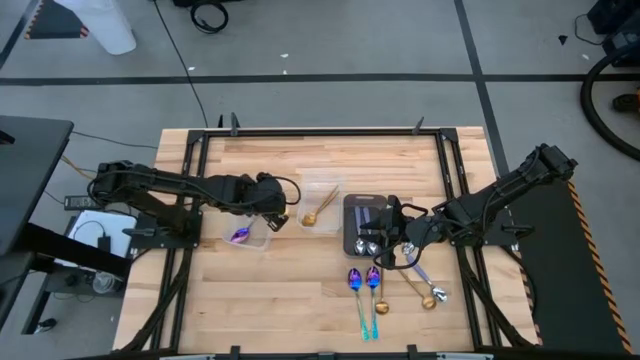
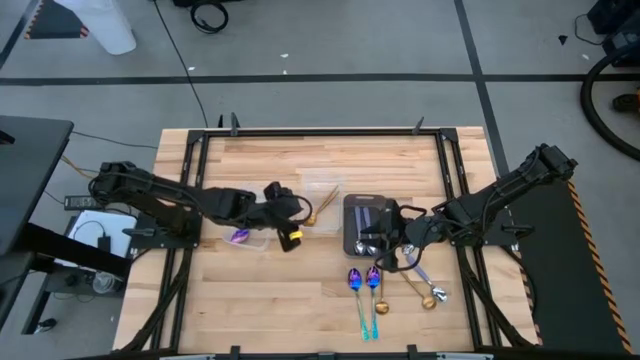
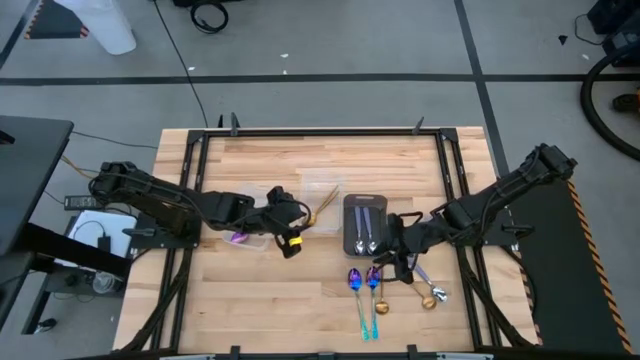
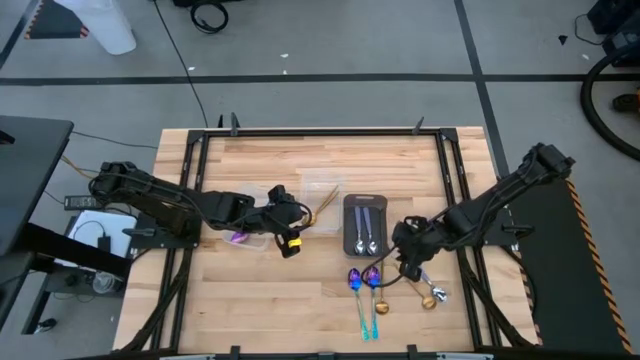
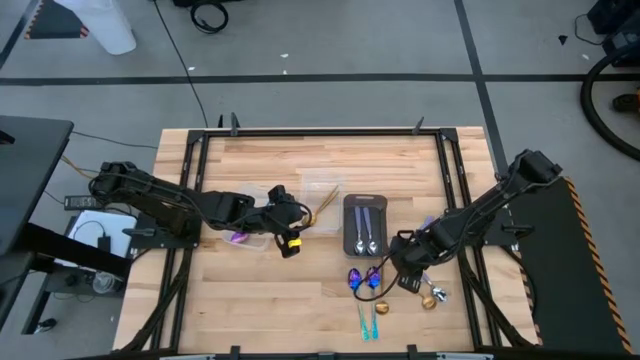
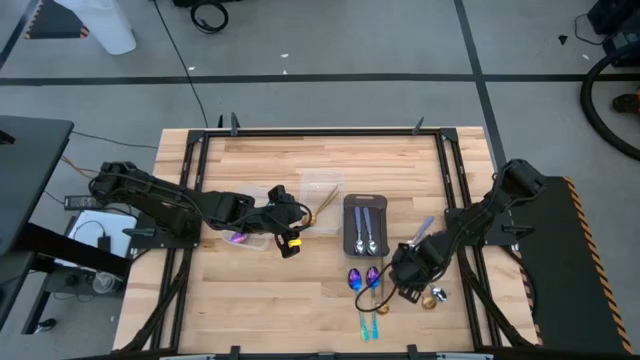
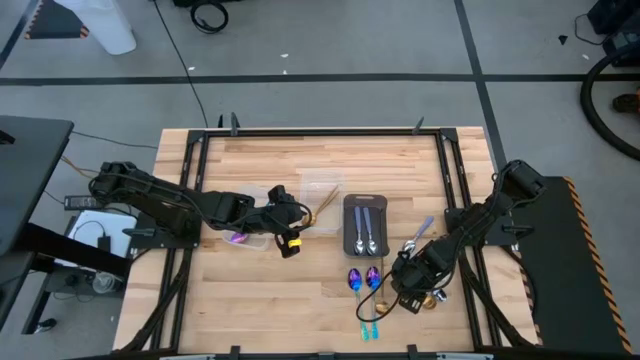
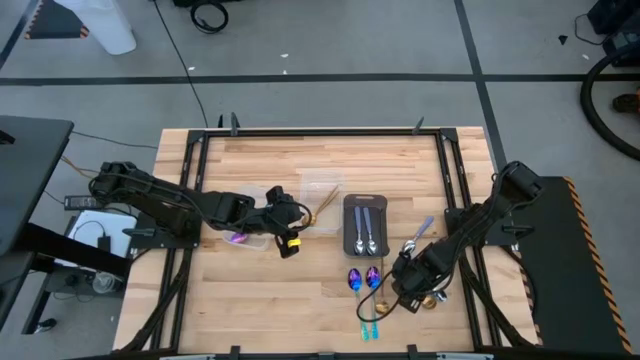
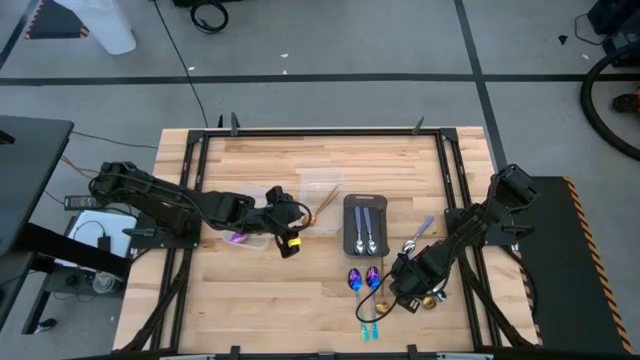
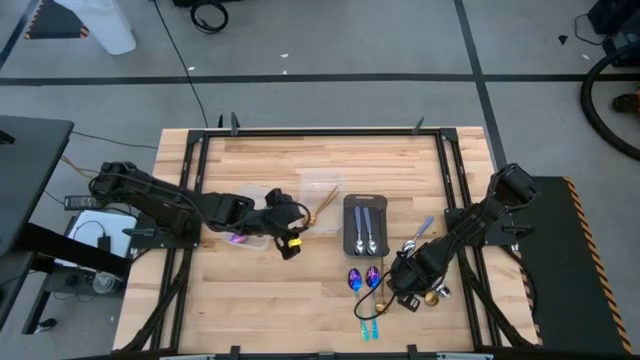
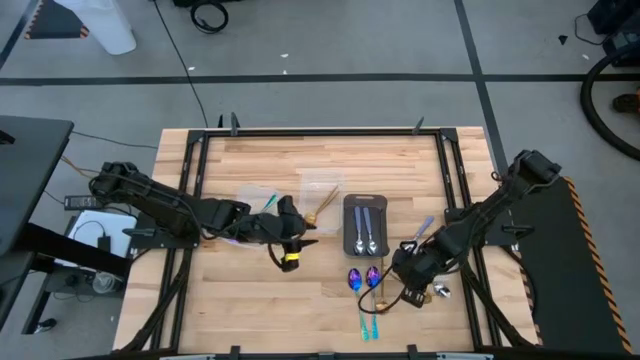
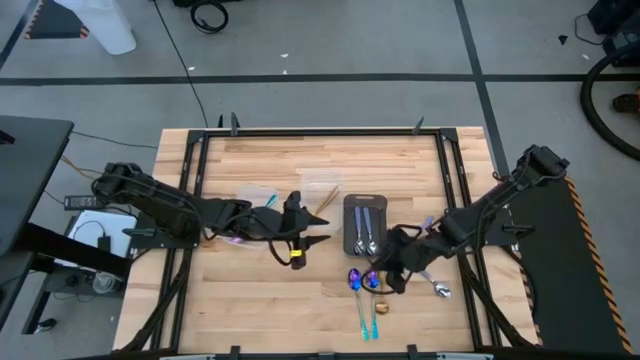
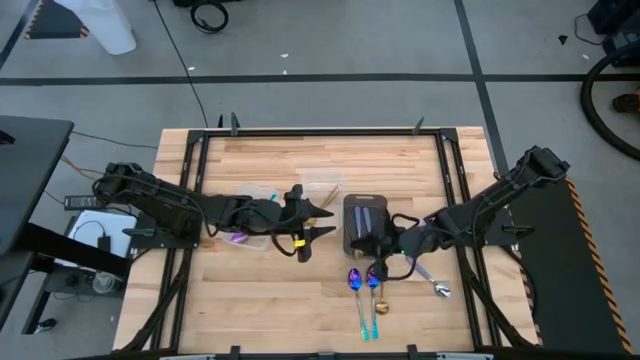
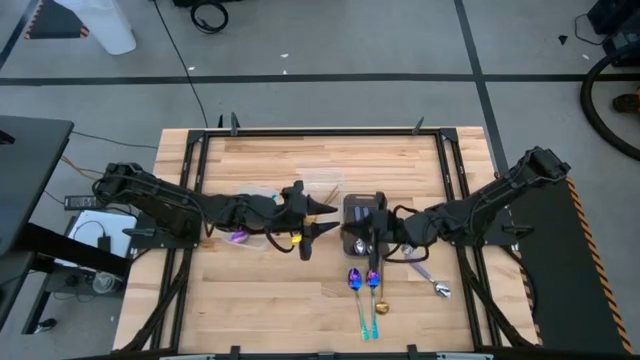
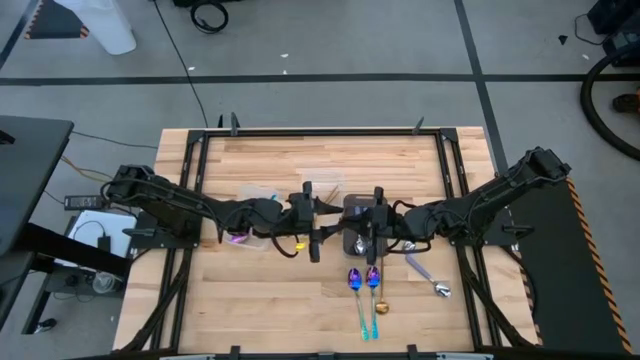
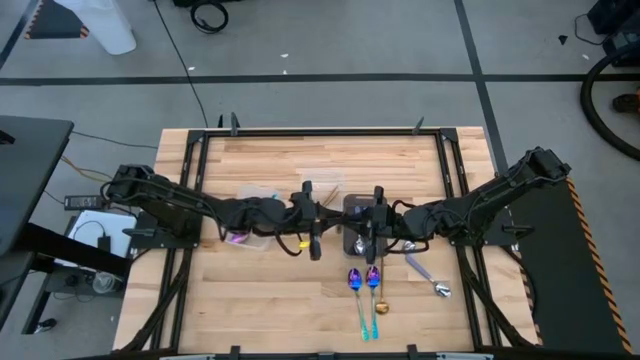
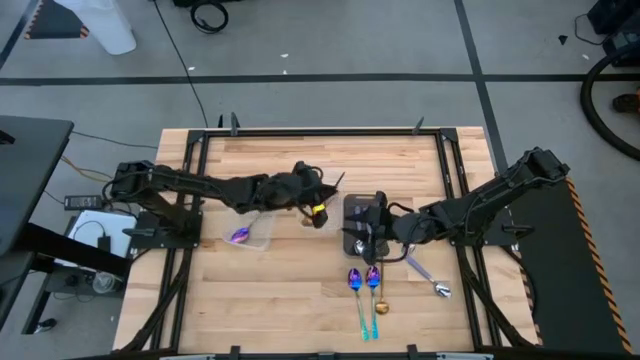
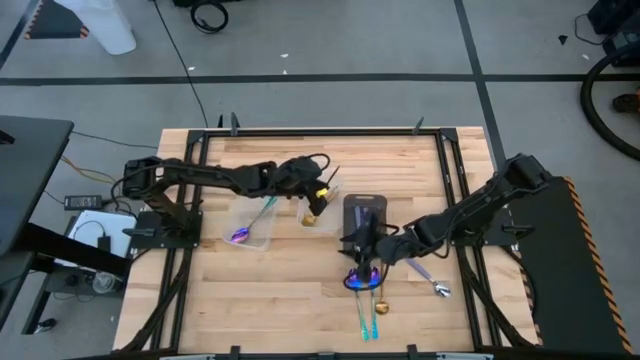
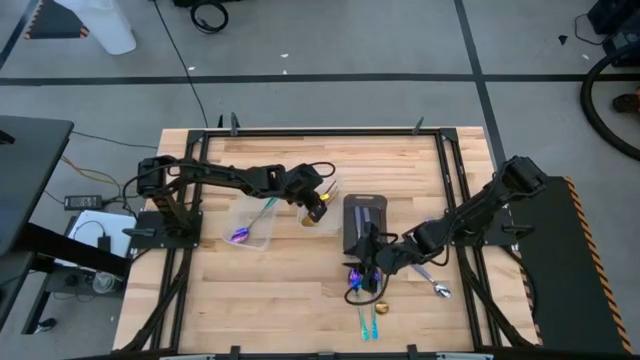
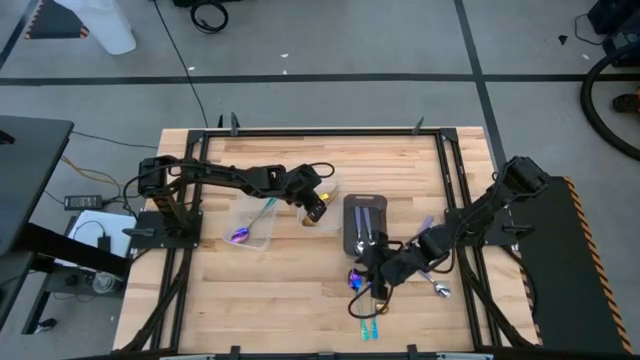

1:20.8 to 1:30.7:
Task: Sort silverware by color (type)
Put the gold spoon into the right transparent bin

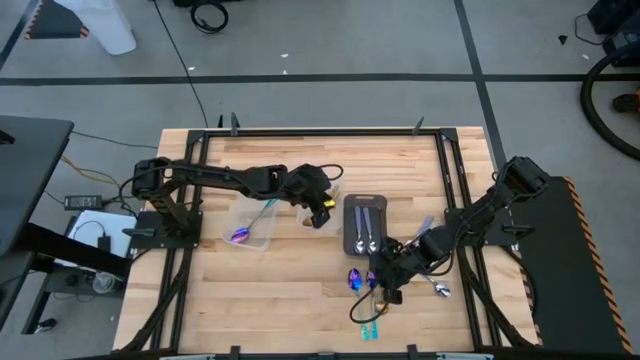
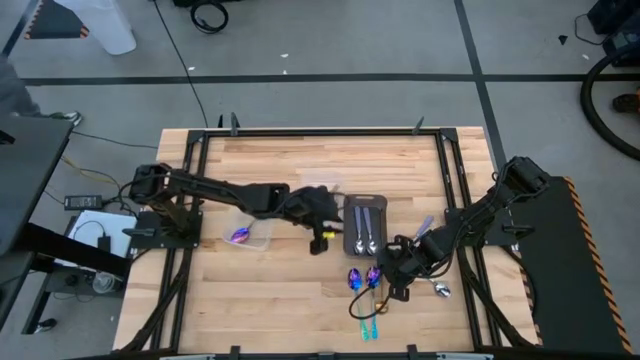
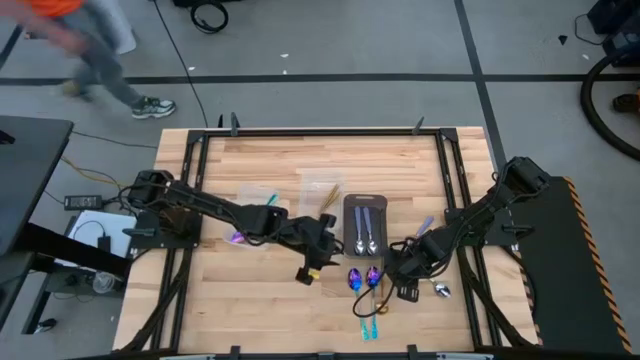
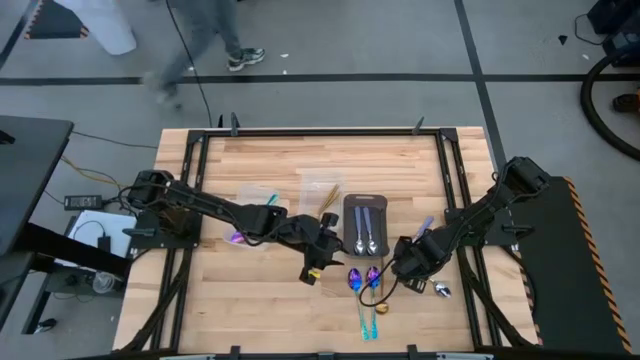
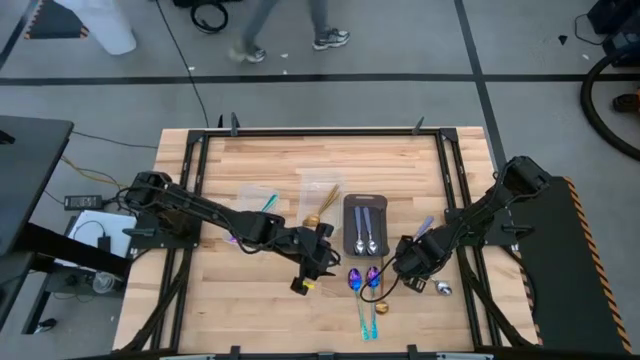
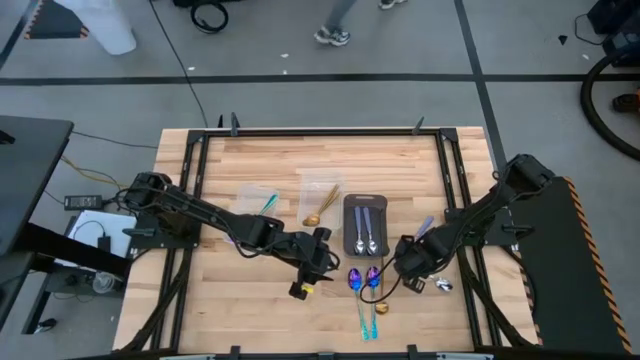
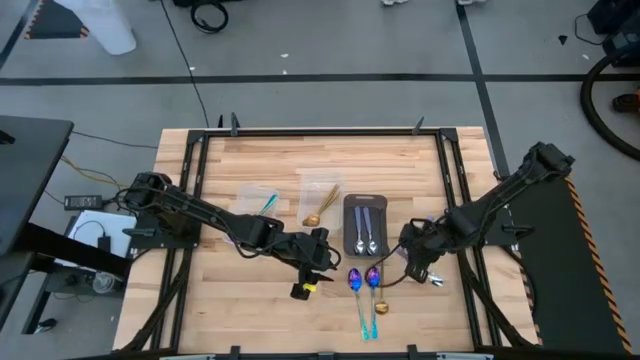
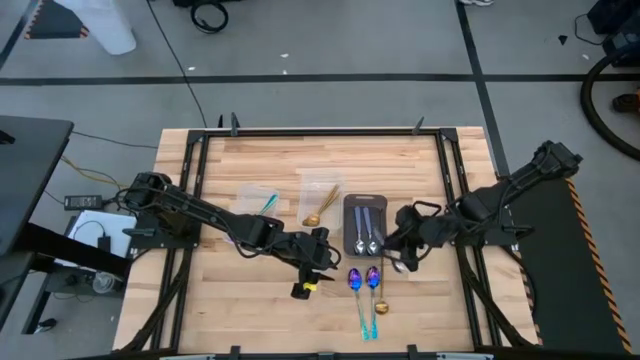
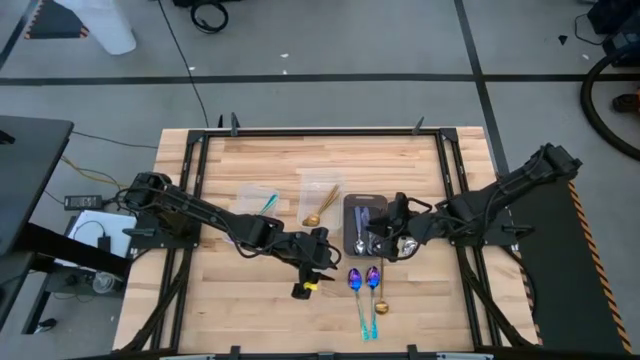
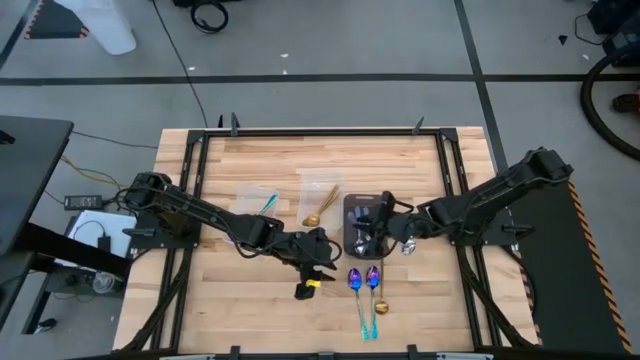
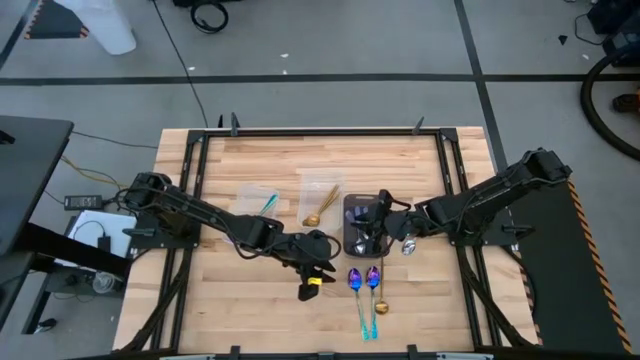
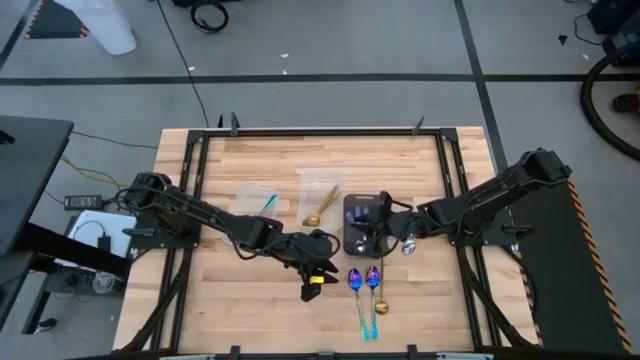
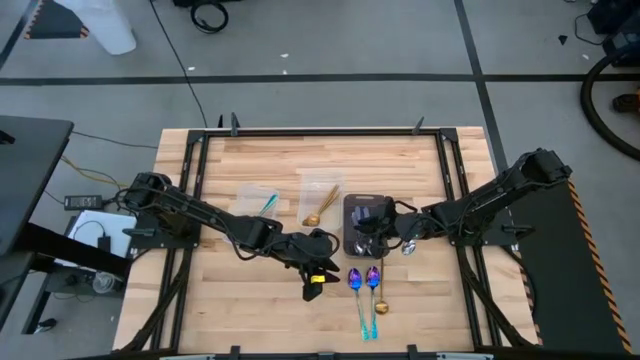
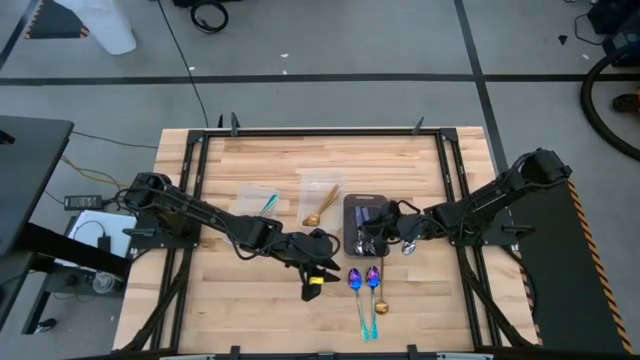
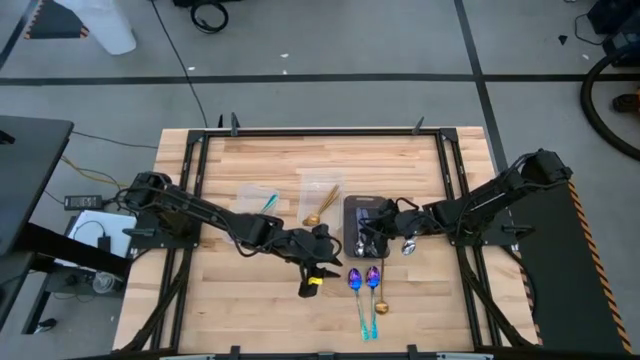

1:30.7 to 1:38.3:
Put the purple spoon into the black bin

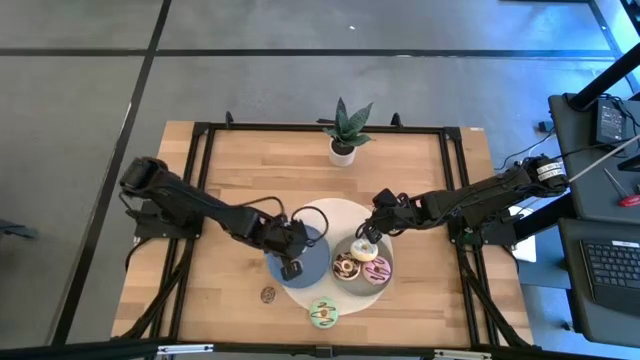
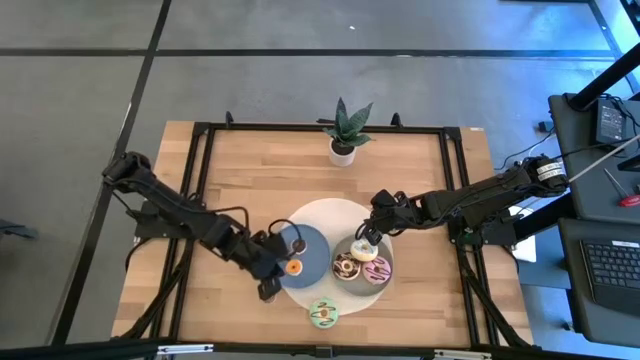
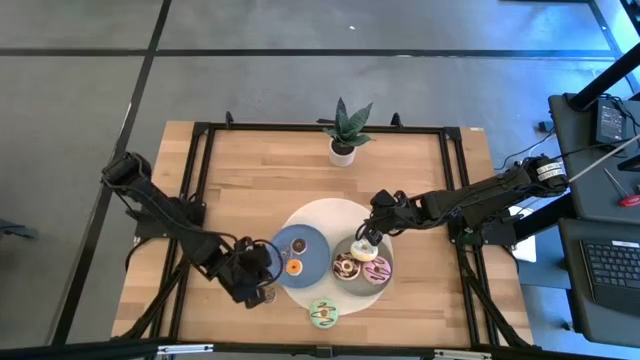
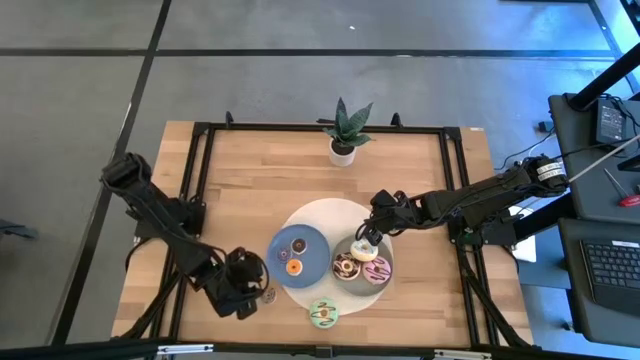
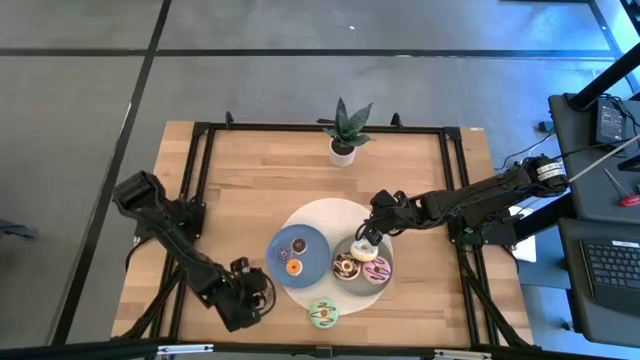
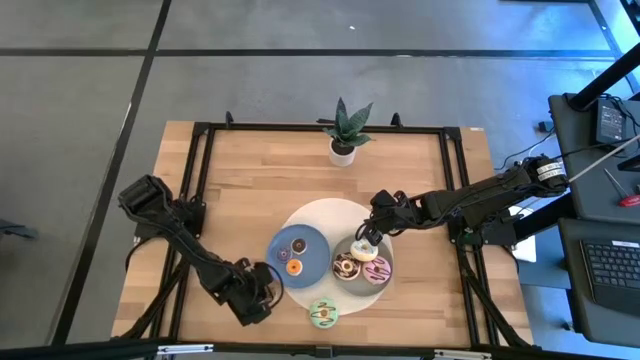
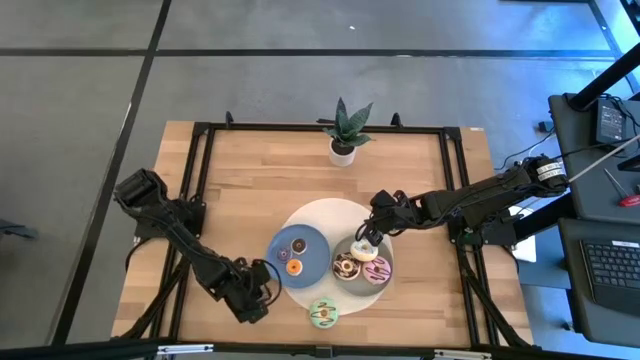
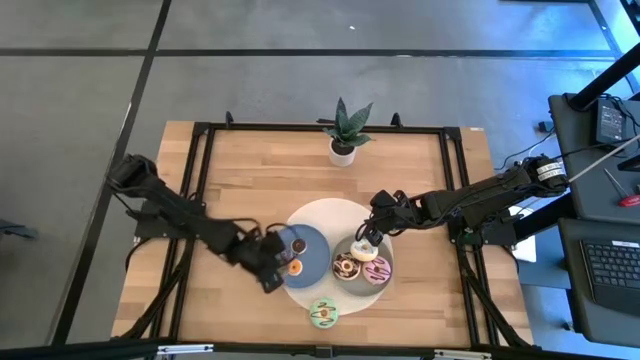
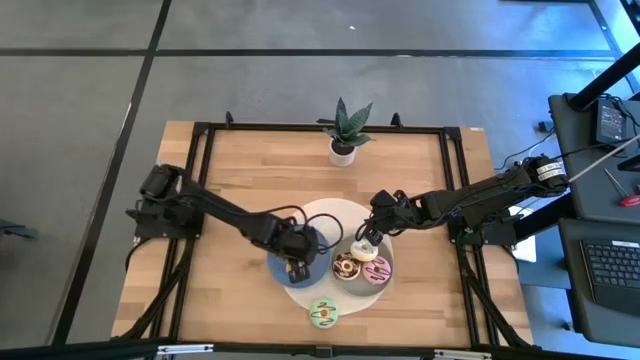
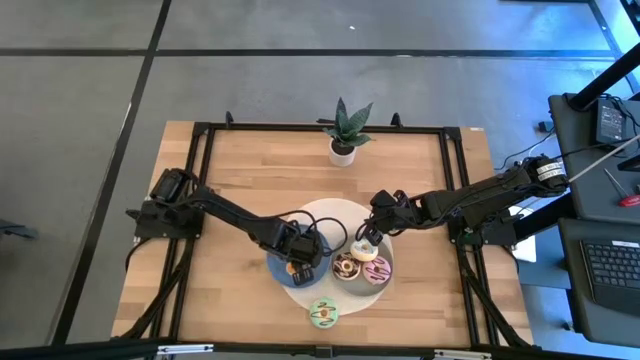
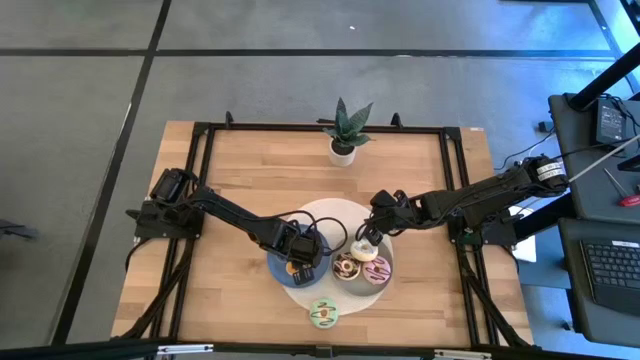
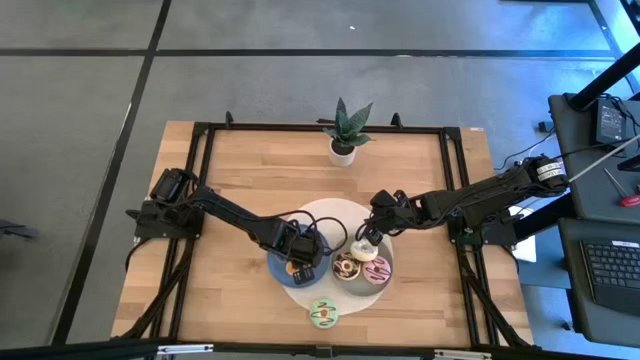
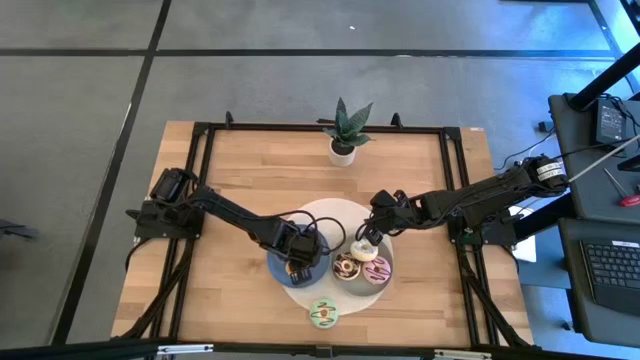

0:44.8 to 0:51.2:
Task: Pick & Place donuts
Put the brown donut on the blue plate
